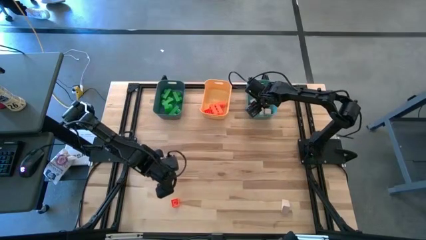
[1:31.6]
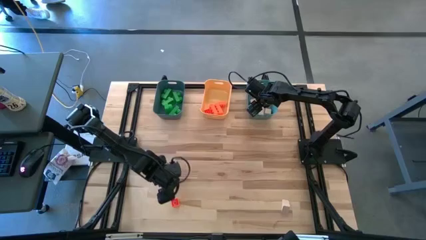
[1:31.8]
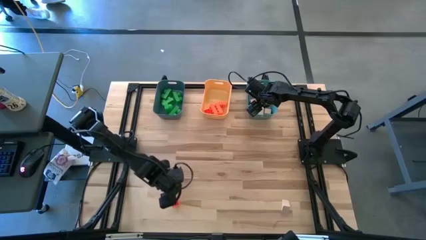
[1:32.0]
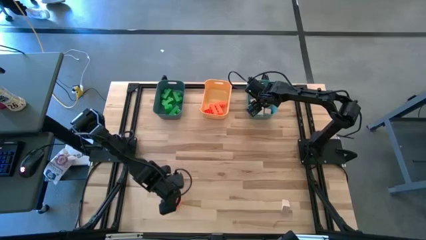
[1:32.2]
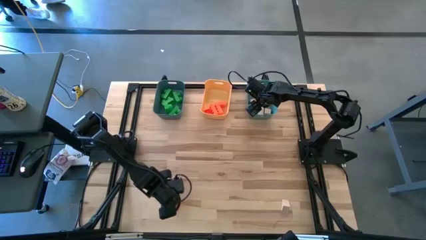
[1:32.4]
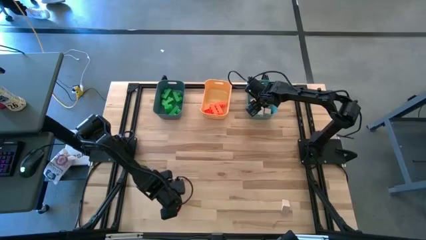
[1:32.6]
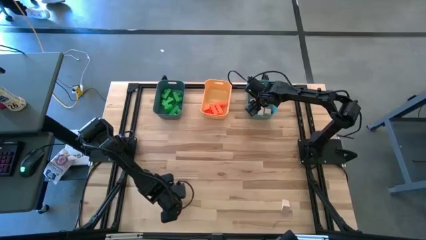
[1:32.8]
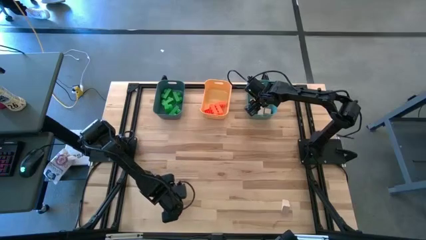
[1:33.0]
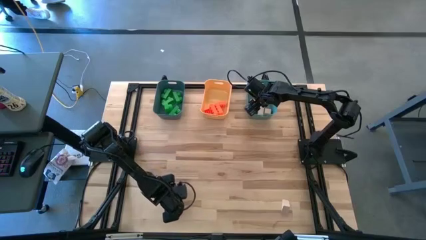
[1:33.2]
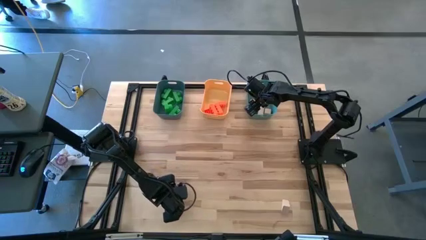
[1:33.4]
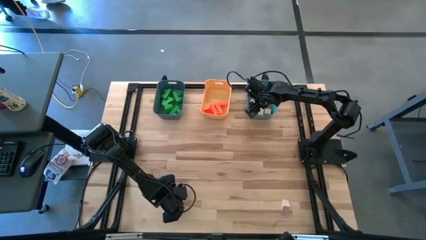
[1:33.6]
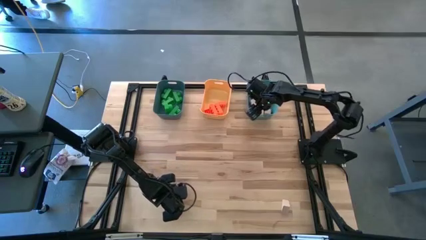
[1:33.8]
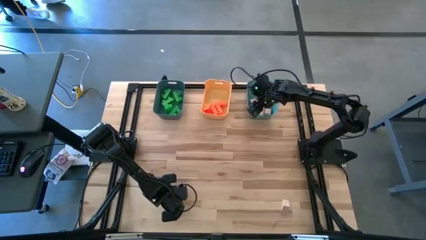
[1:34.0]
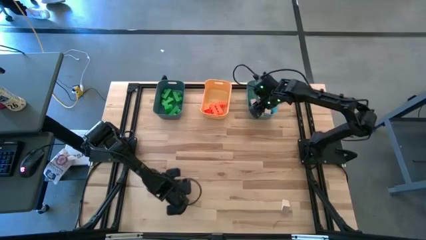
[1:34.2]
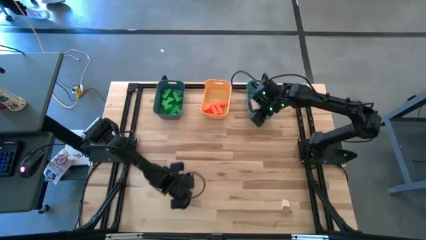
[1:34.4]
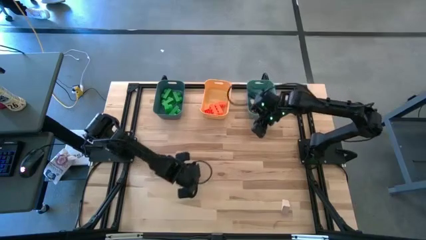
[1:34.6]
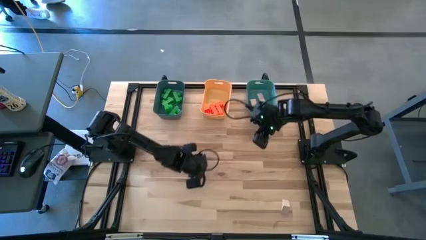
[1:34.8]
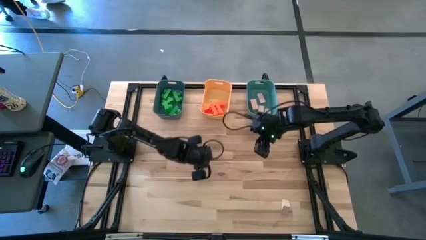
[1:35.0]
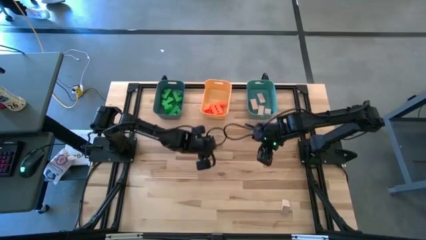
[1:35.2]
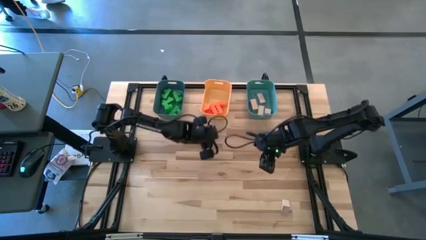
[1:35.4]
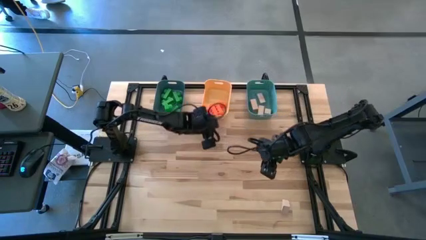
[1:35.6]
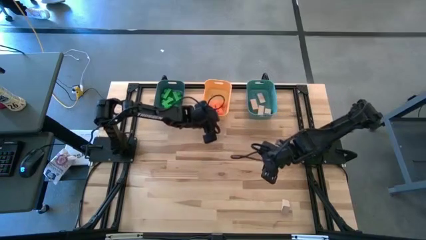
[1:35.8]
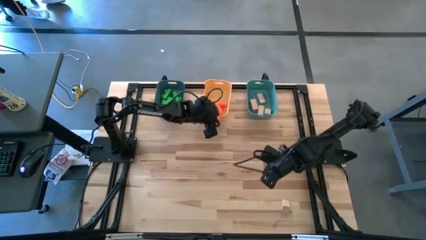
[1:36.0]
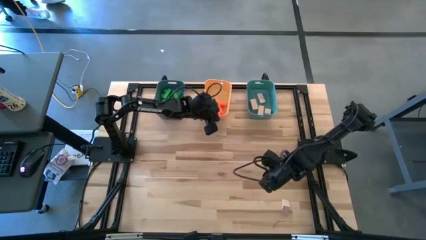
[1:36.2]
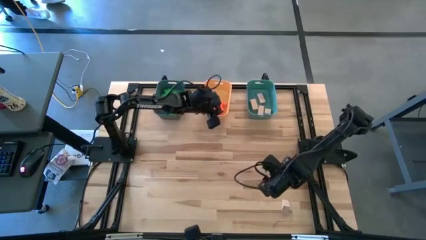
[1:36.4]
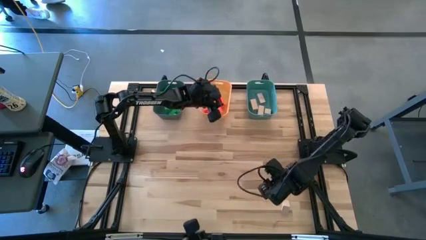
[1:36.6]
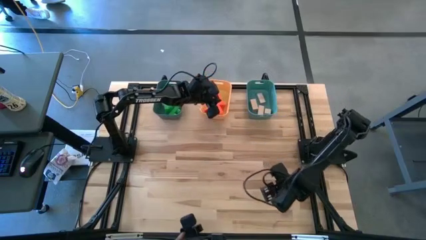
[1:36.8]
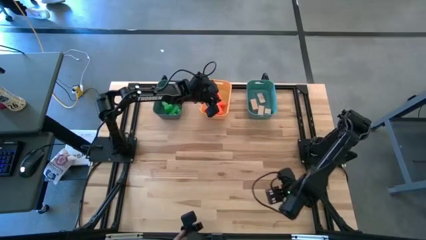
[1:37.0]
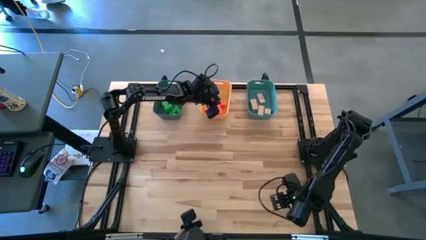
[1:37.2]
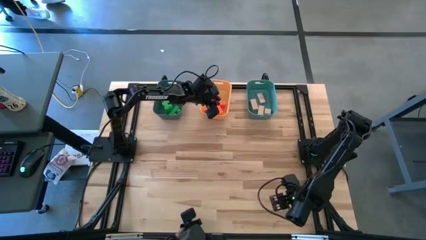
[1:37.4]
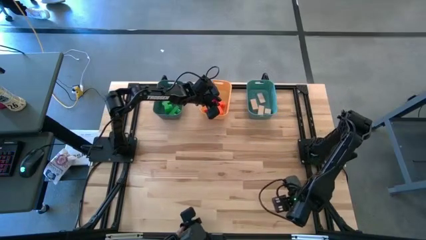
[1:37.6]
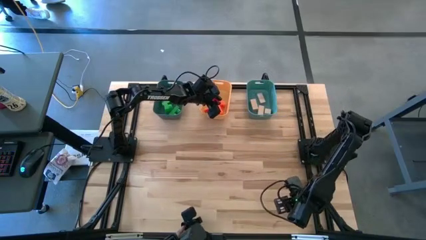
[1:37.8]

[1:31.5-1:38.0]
Task: Sort & place blocks by color
Put the orange game piece into the yellow bin

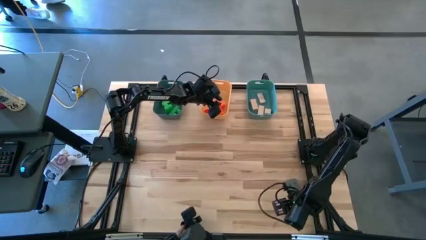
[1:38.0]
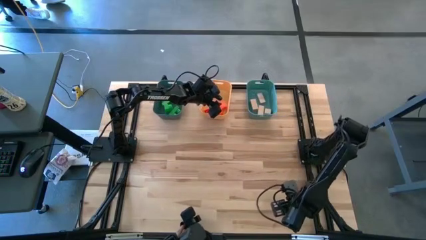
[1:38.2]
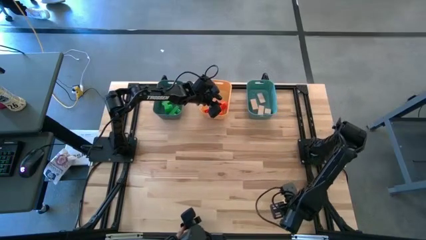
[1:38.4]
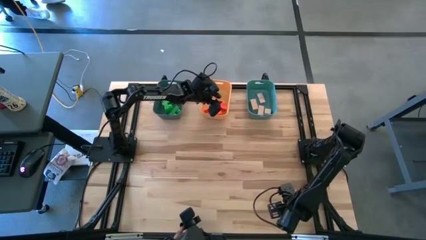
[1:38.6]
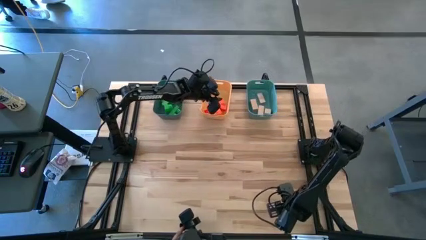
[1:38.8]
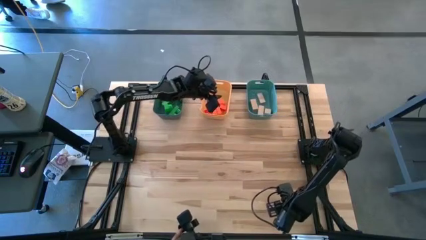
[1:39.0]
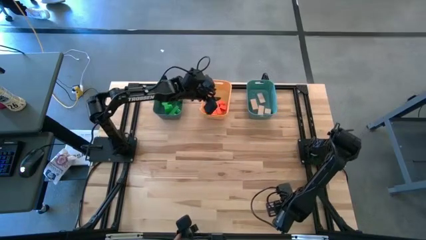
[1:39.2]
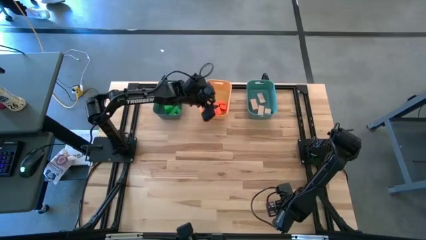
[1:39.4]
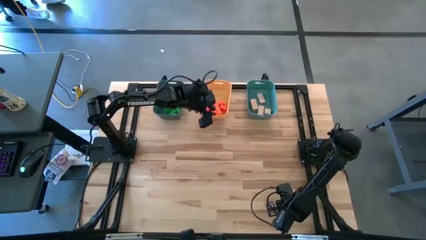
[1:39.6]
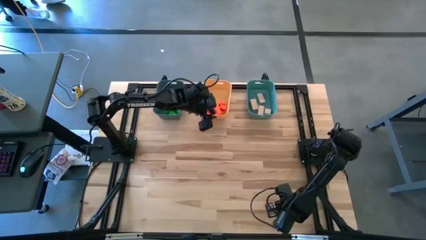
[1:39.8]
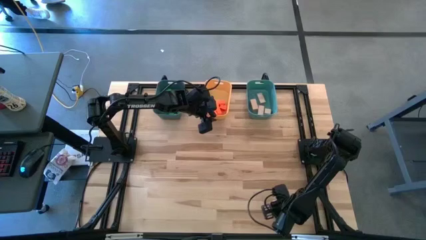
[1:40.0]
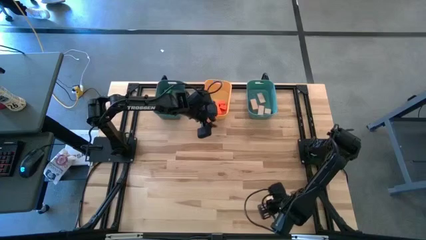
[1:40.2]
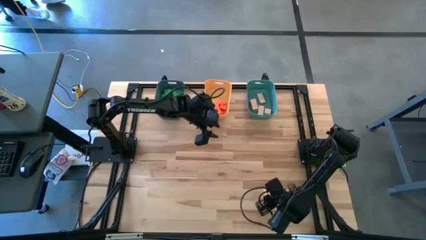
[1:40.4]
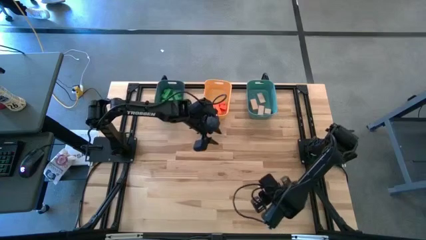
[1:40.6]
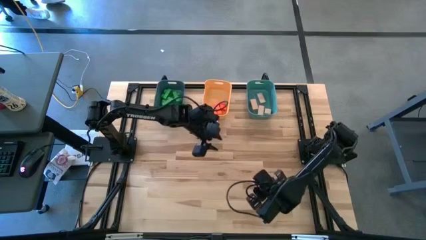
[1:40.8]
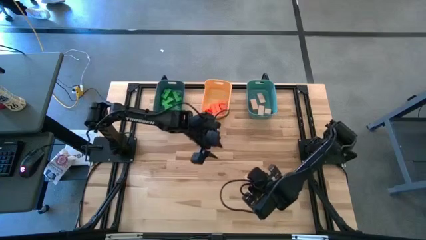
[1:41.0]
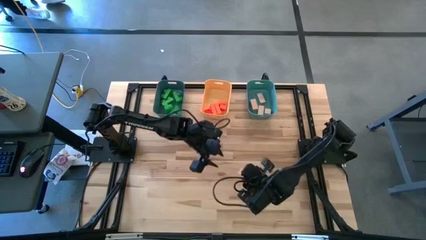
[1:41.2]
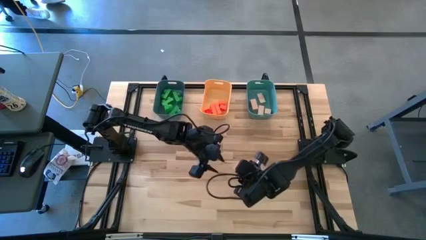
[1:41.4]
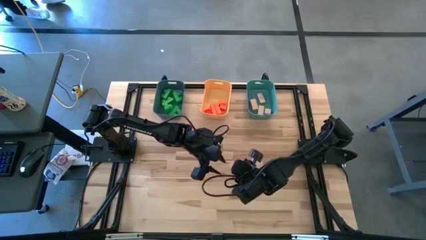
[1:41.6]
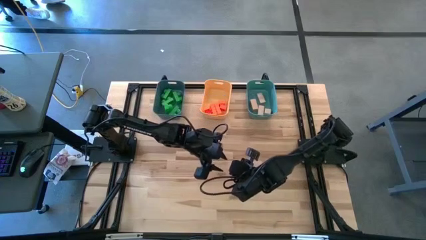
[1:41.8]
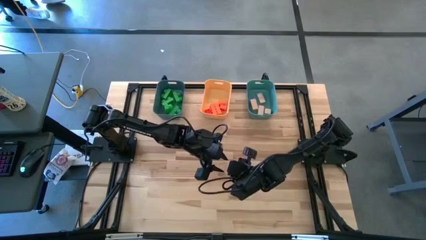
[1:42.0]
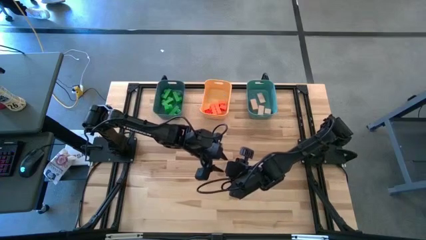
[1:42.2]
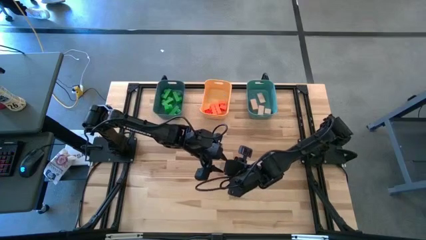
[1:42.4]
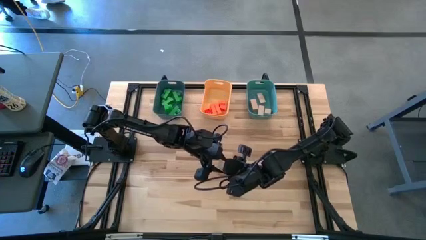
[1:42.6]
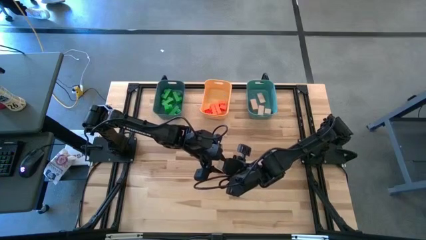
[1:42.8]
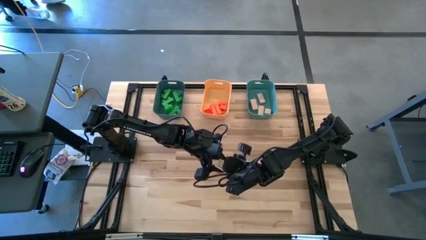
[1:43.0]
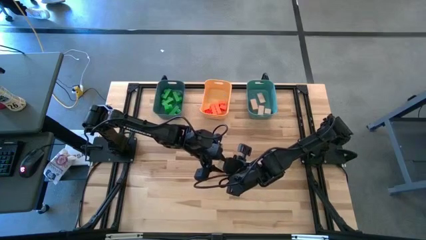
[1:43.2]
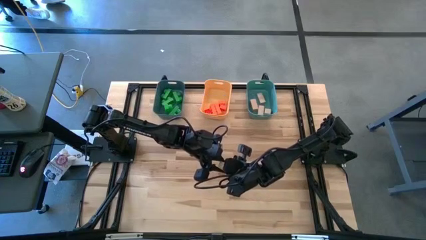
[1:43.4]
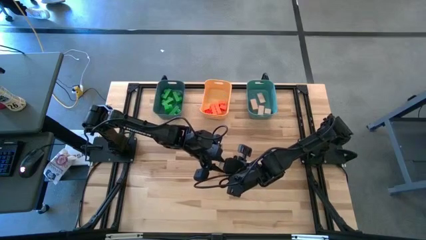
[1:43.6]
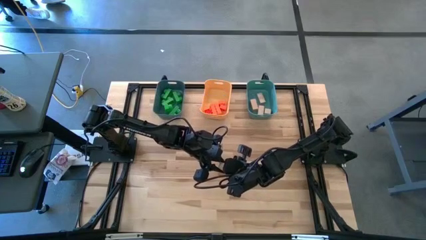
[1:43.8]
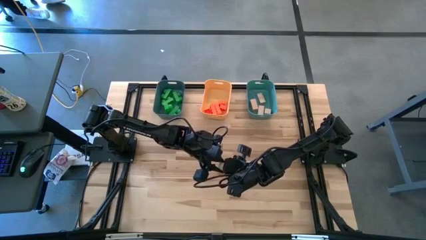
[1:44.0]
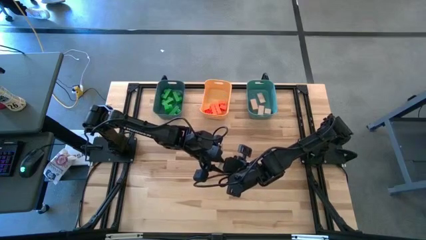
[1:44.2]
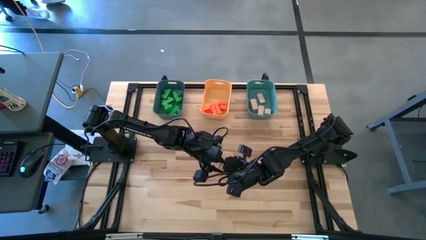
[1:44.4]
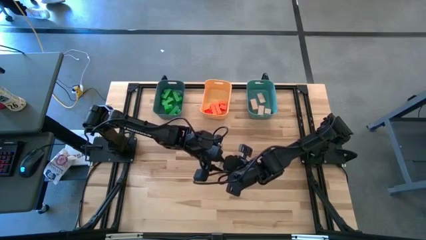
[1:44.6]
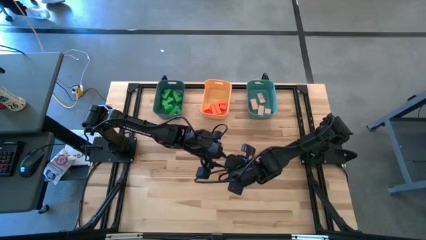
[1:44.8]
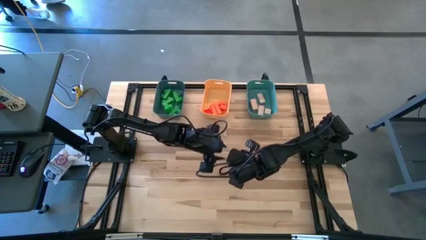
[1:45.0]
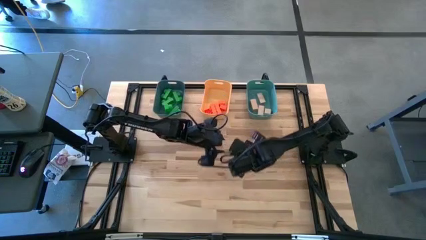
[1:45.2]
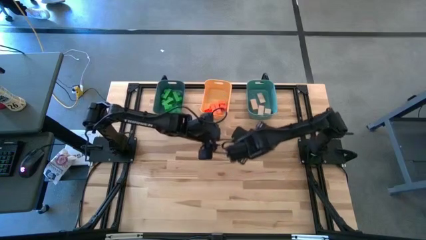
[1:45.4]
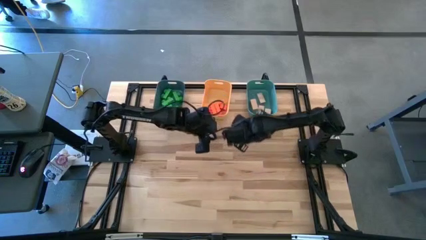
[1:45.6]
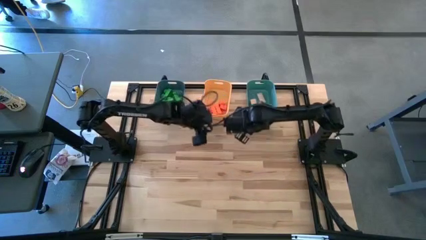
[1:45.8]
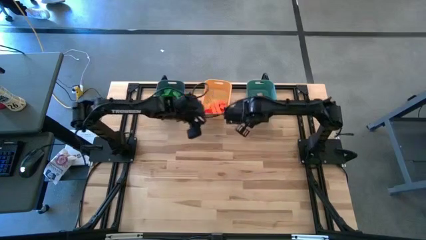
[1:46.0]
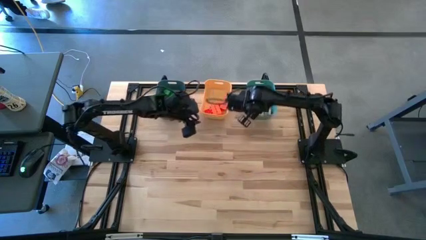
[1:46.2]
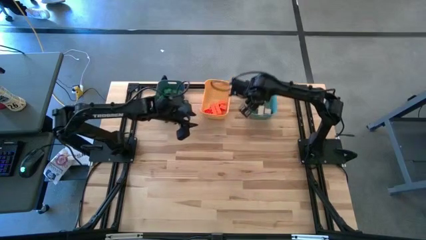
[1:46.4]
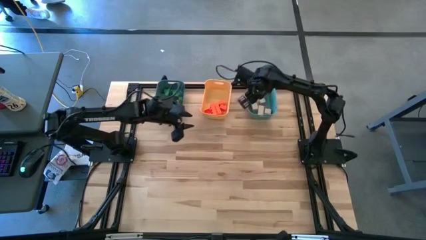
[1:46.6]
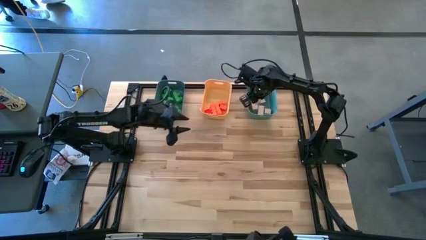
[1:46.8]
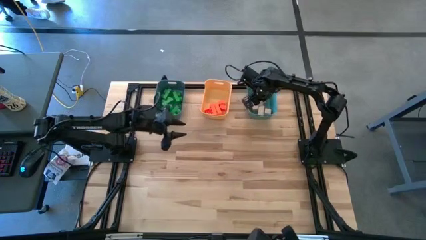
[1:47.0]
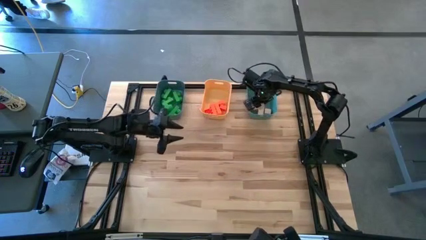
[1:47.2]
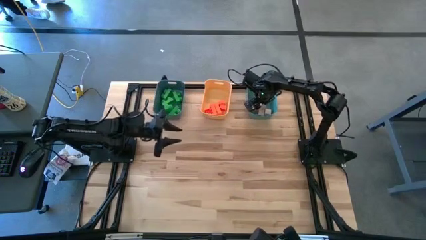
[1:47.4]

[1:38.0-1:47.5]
Put the white block into the green bin
